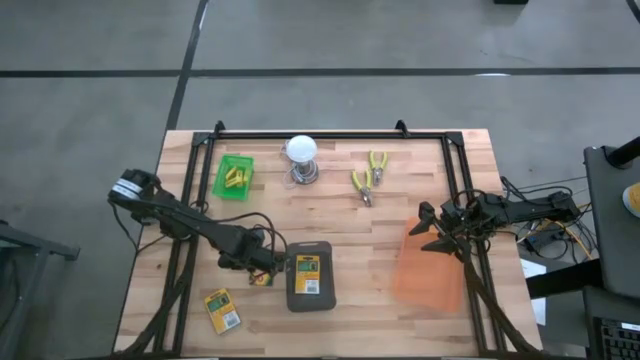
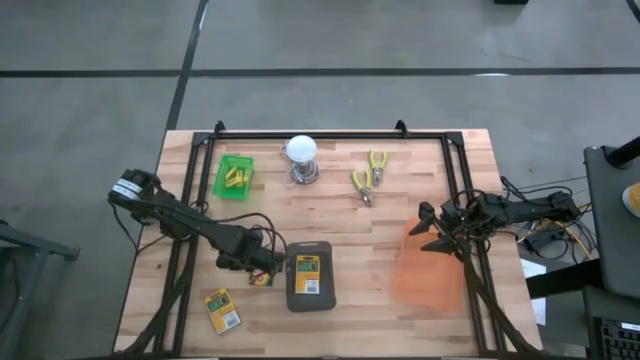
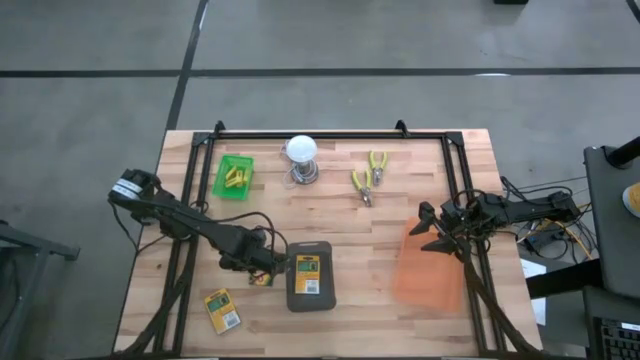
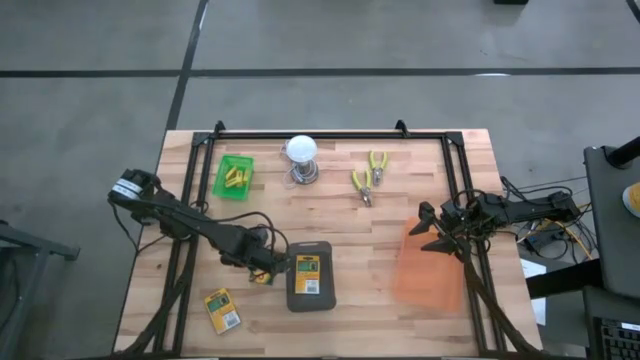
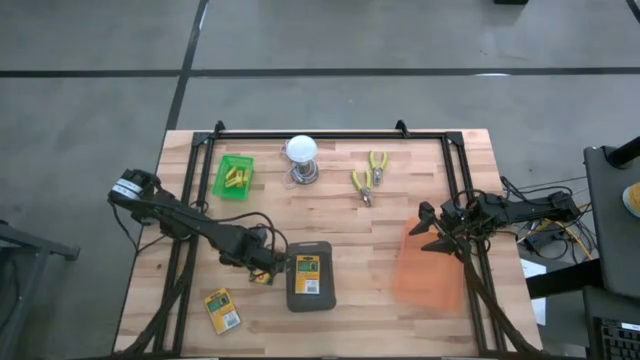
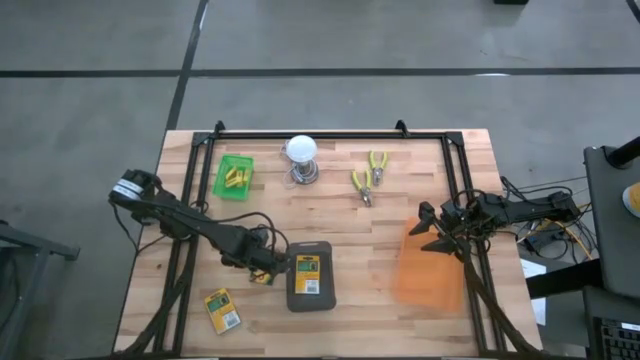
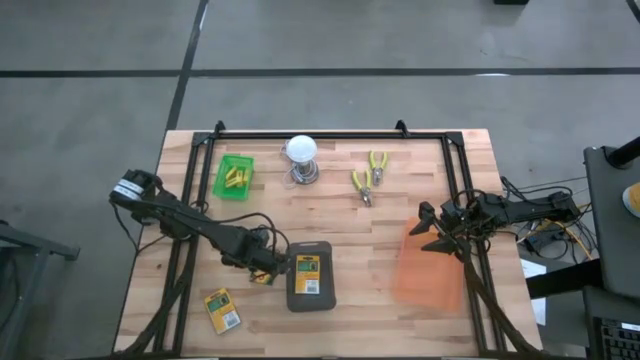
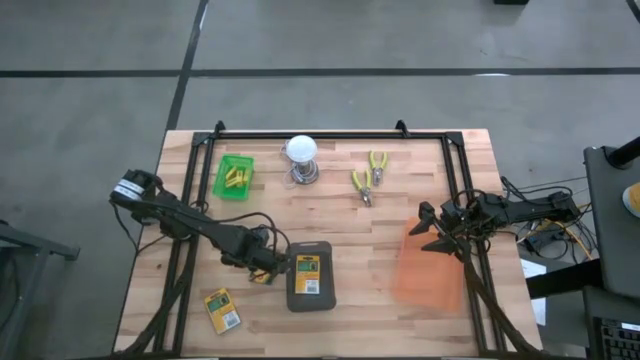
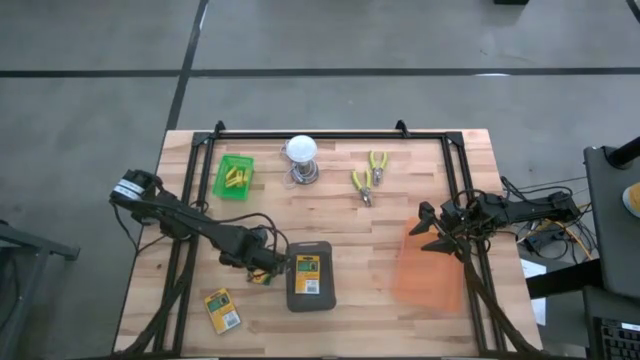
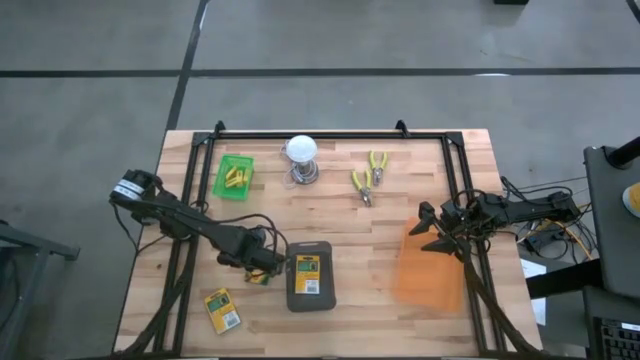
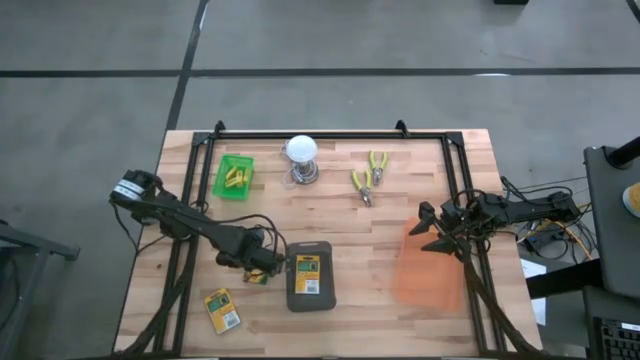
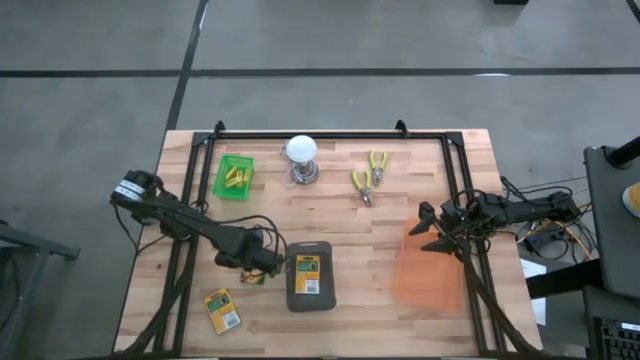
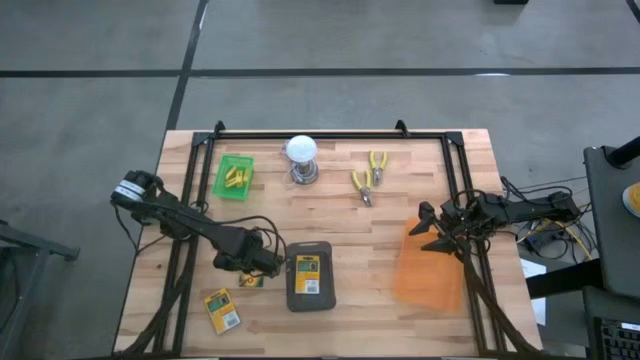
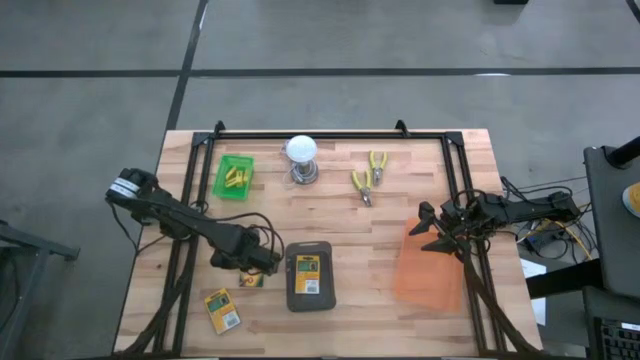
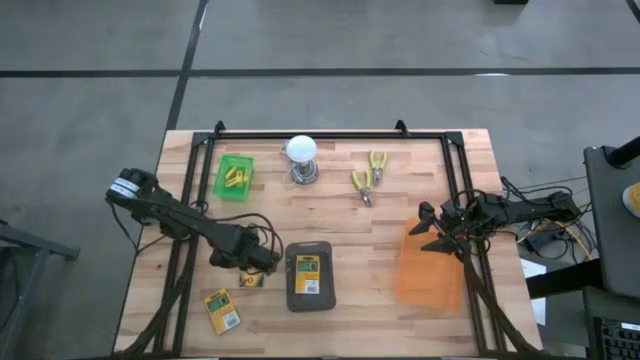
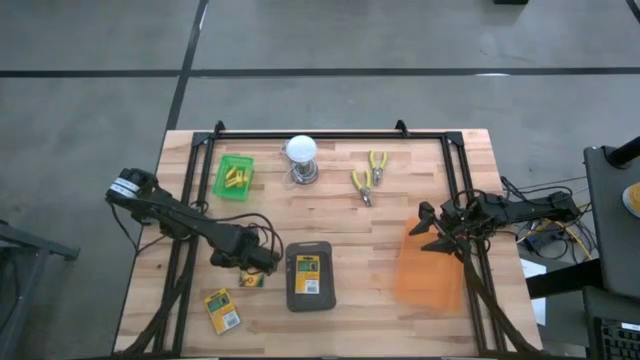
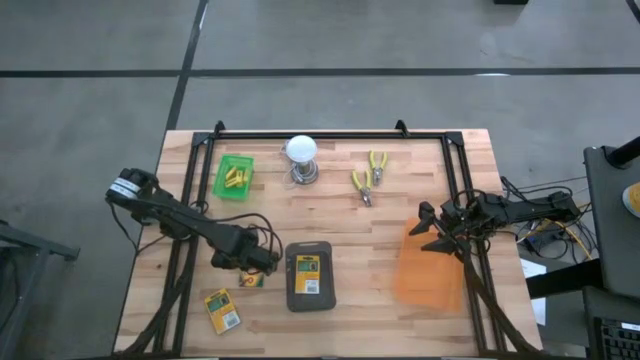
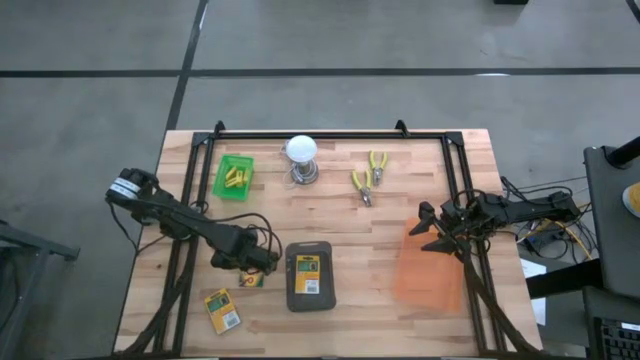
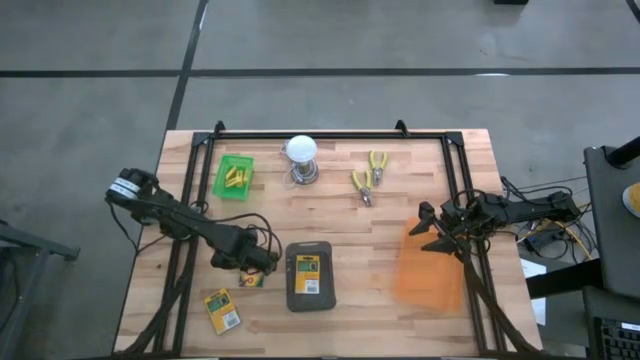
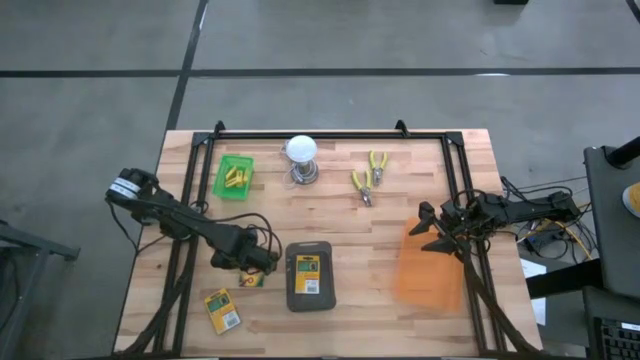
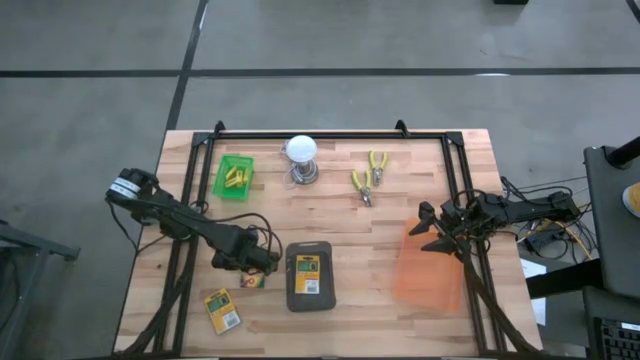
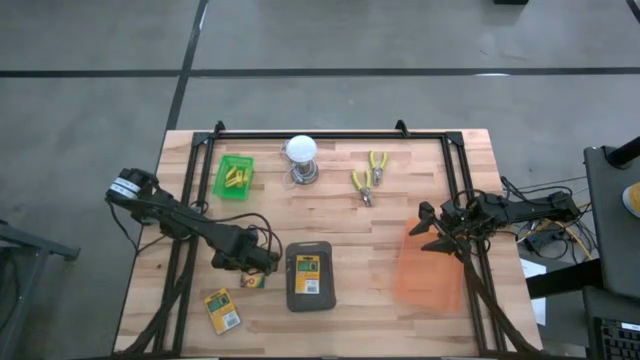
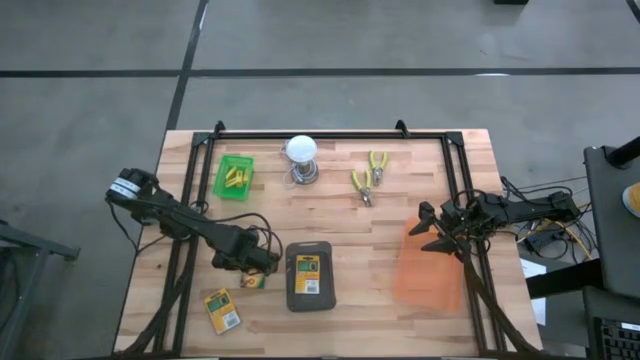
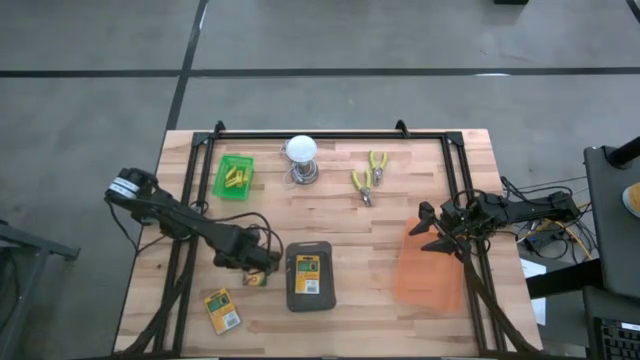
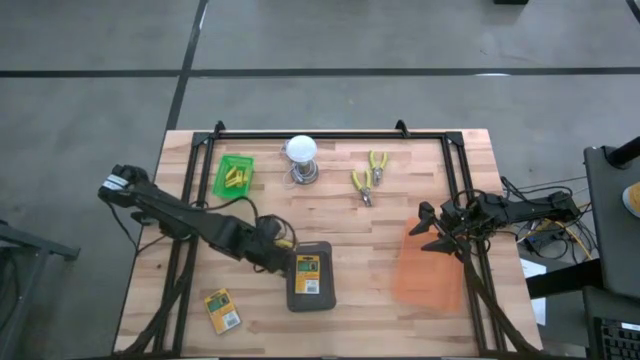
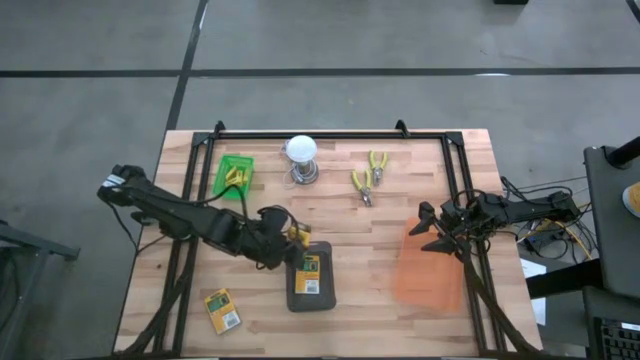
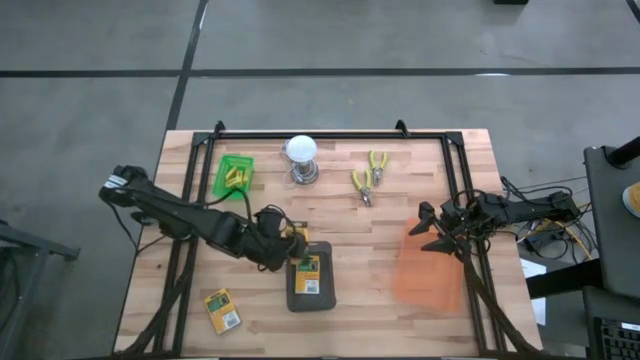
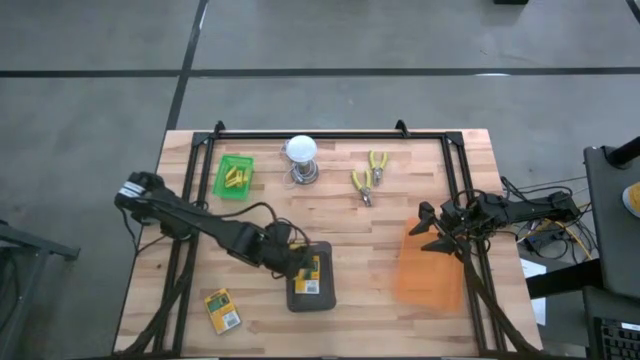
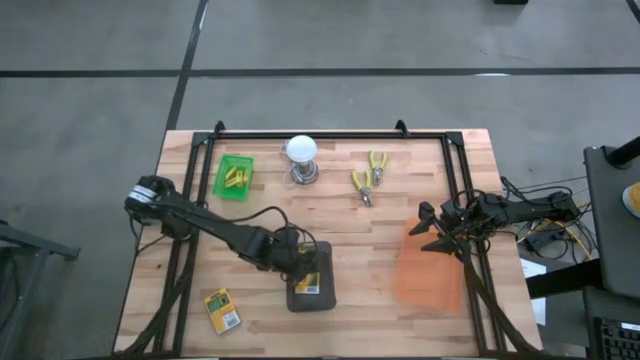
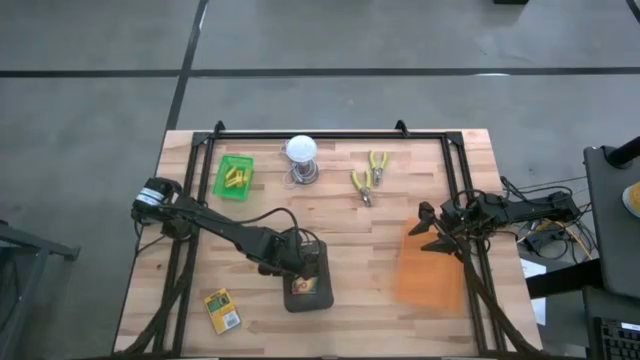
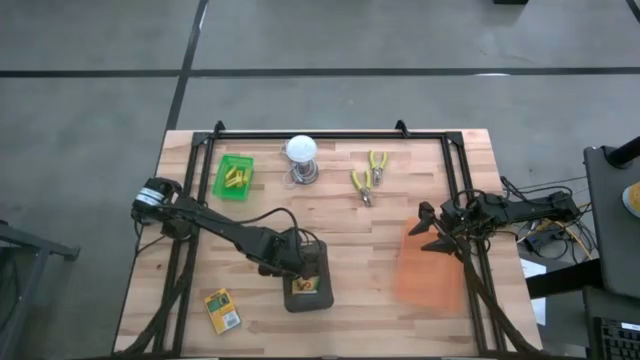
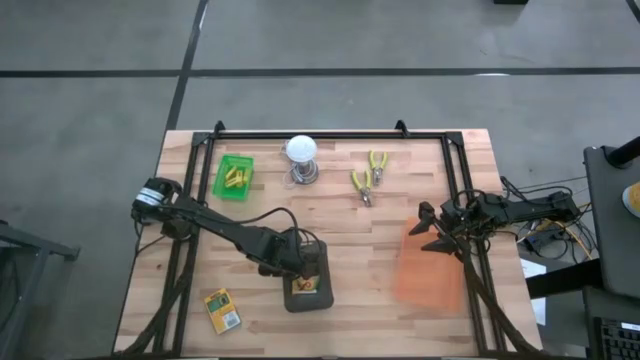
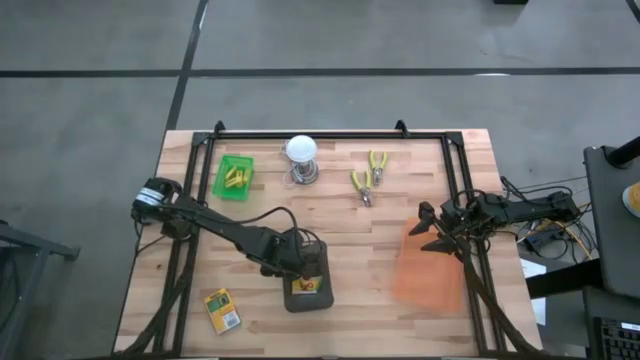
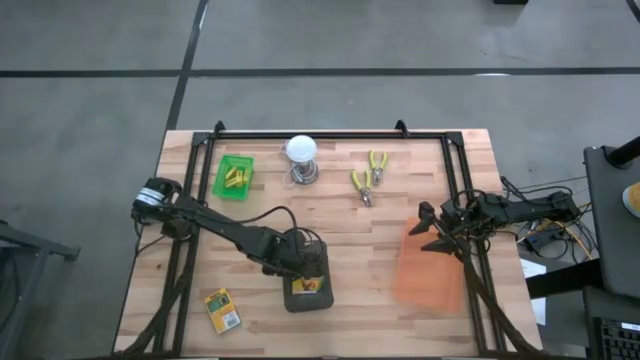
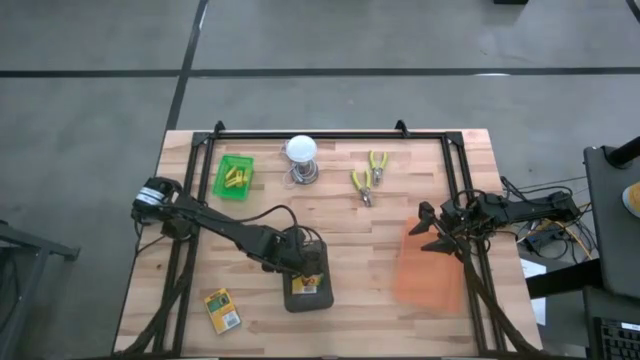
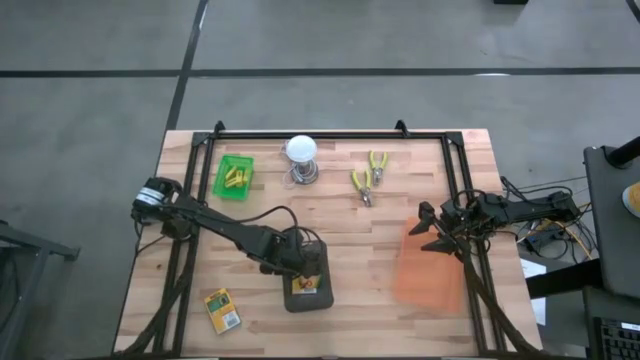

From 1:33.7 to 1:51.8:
Task: Pick & Place School Supplies
Put the yellow crayon box into the black bin

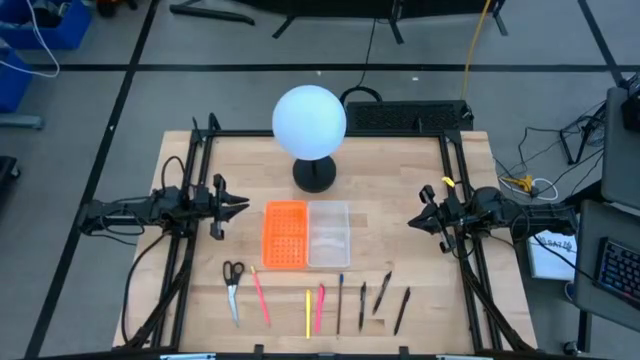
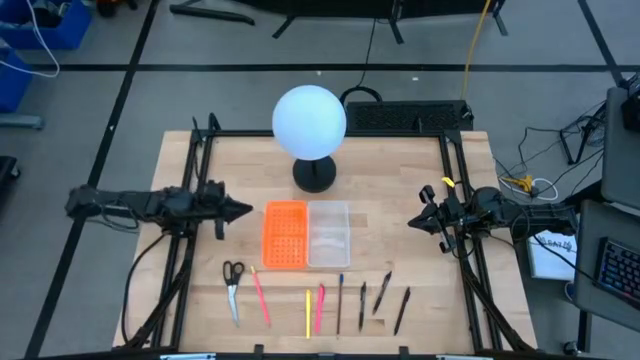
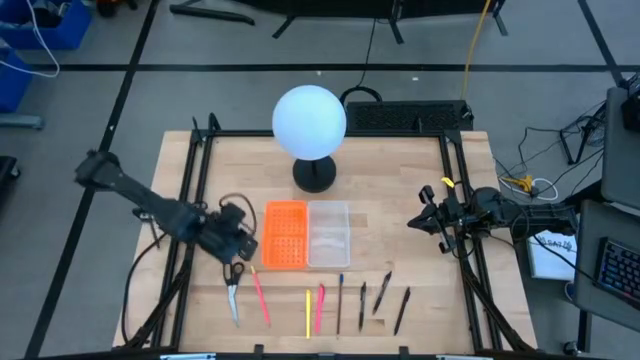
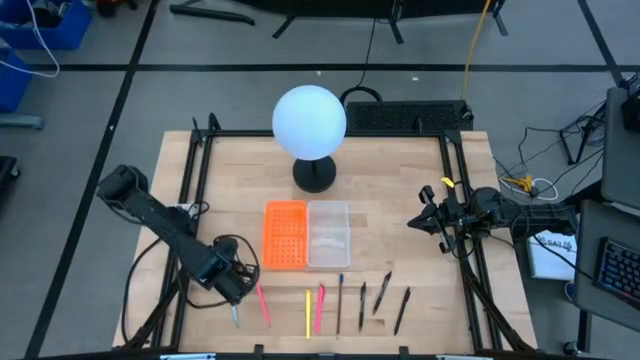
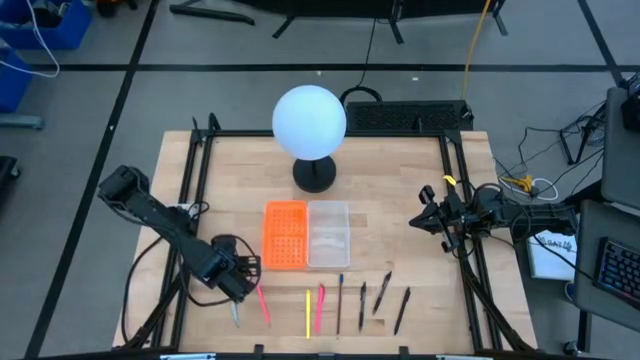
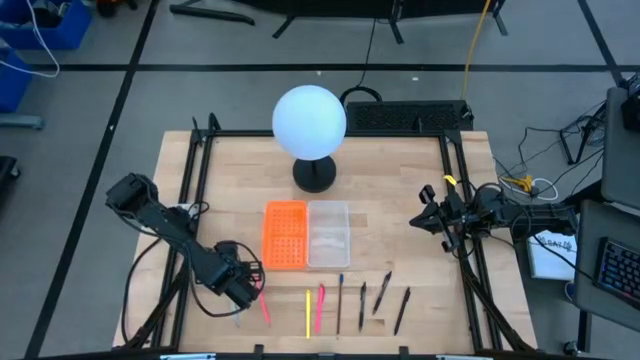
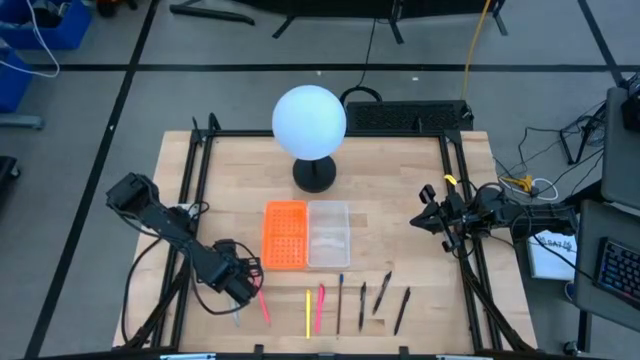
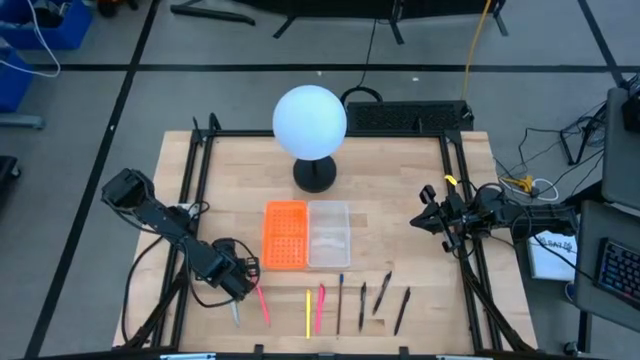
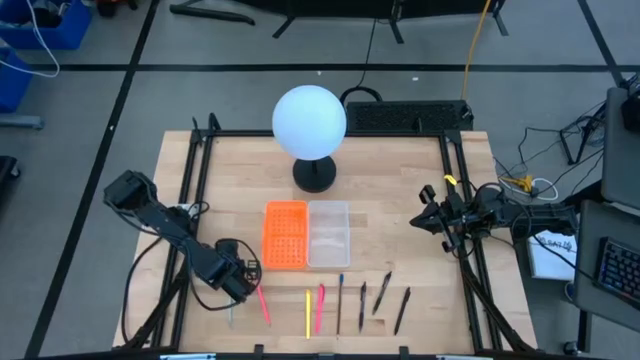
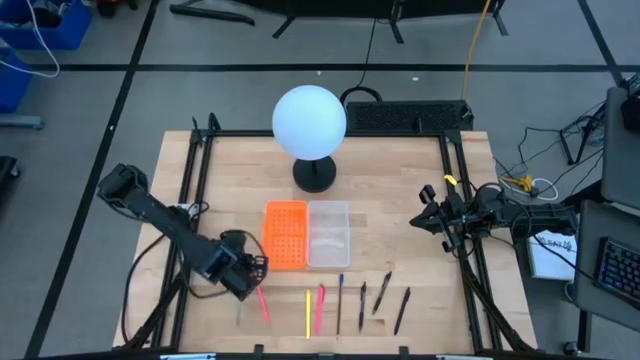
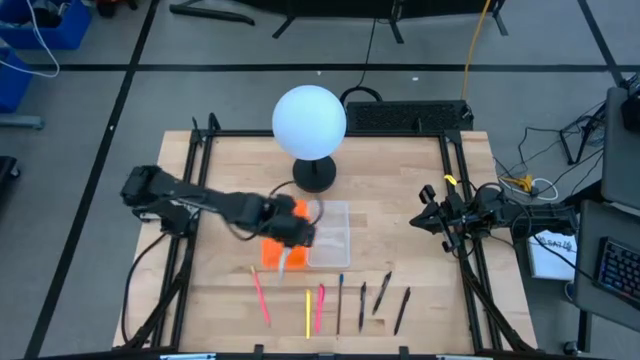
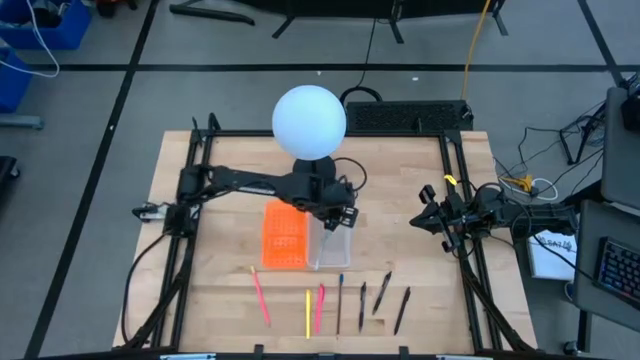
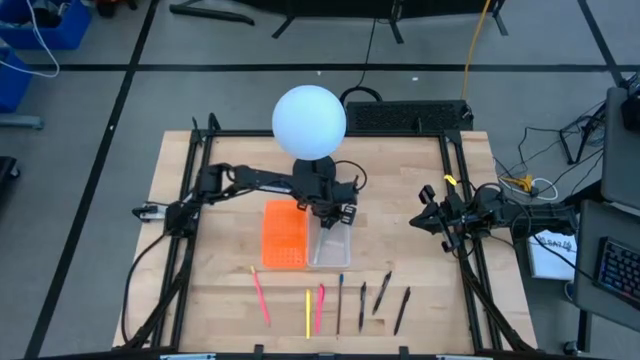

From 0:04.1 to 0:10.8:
Task: Pick & place school supplies into a supply box
Put the black scissors into the pencil box
